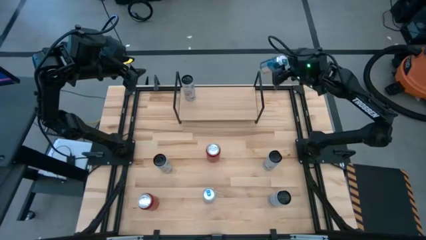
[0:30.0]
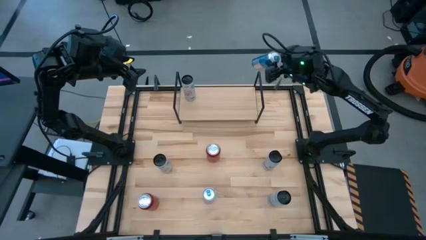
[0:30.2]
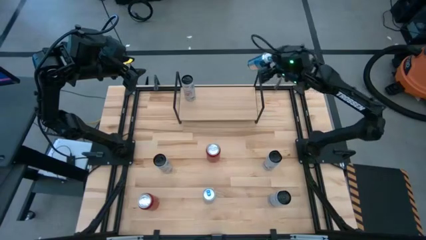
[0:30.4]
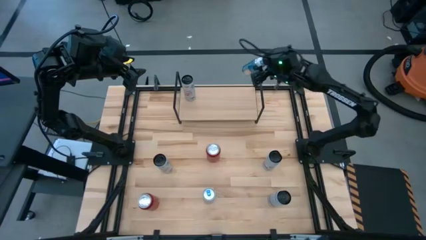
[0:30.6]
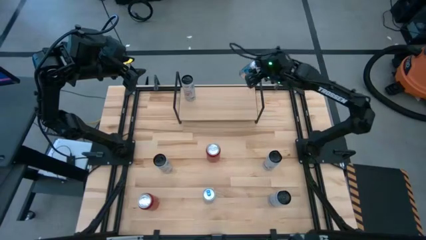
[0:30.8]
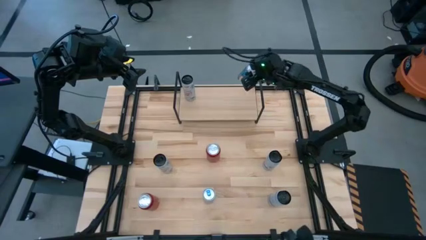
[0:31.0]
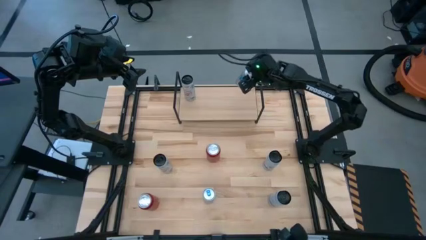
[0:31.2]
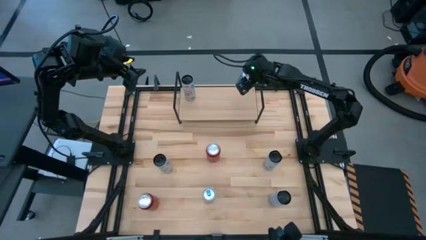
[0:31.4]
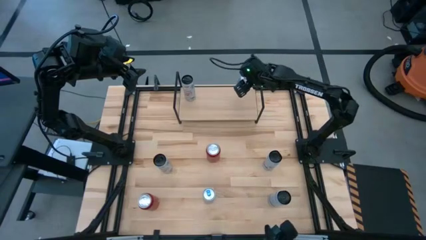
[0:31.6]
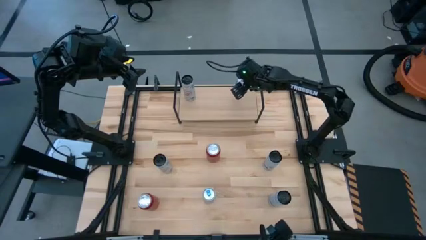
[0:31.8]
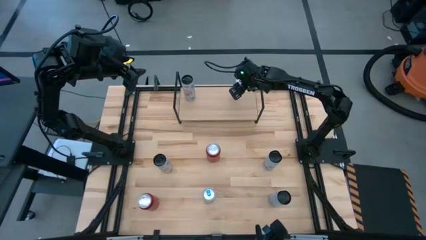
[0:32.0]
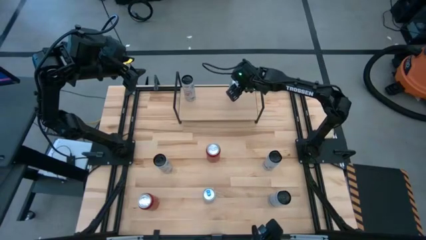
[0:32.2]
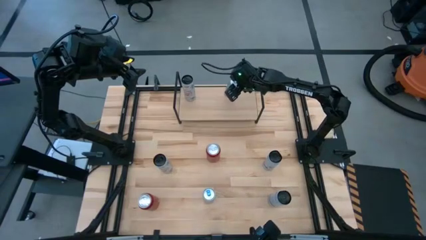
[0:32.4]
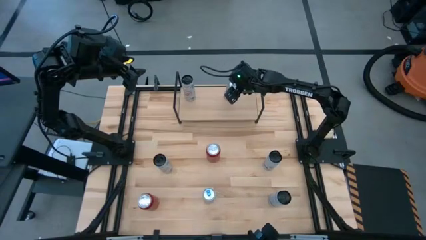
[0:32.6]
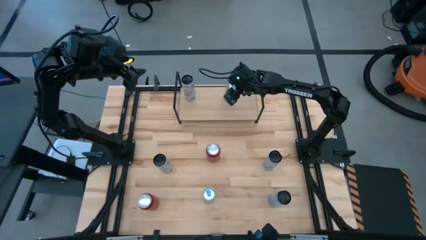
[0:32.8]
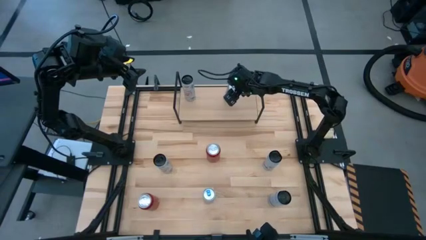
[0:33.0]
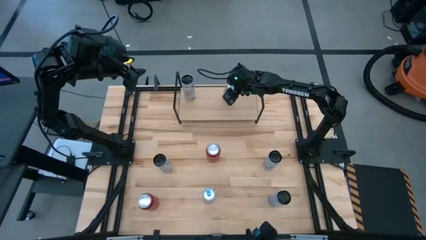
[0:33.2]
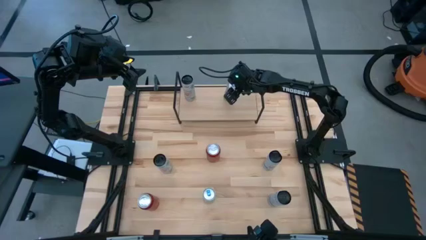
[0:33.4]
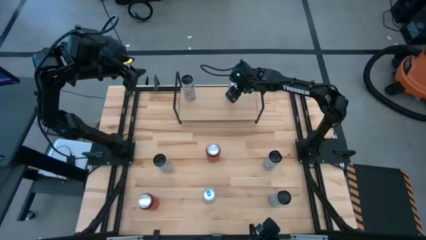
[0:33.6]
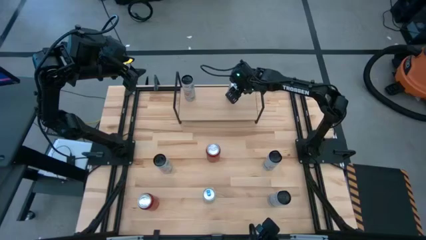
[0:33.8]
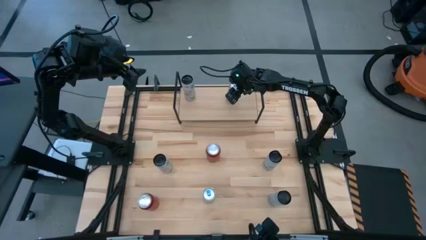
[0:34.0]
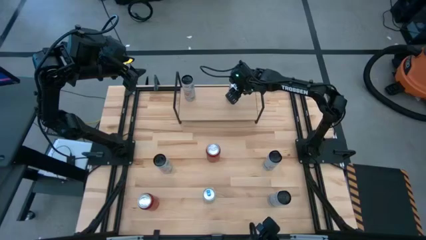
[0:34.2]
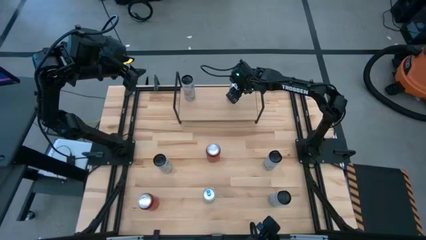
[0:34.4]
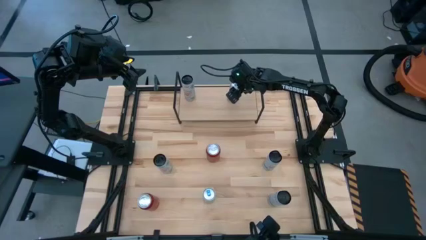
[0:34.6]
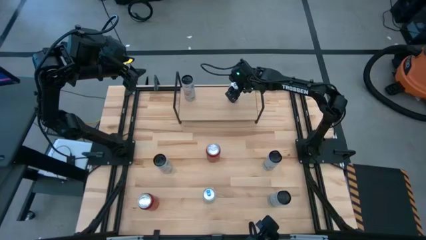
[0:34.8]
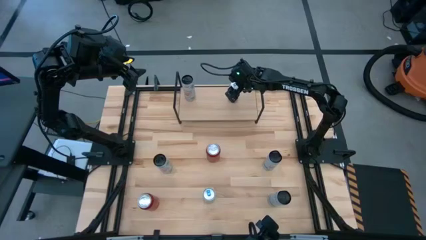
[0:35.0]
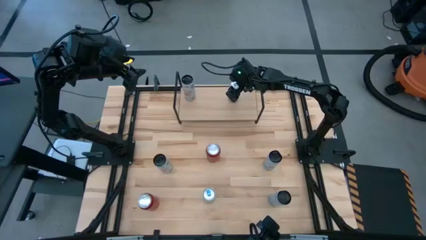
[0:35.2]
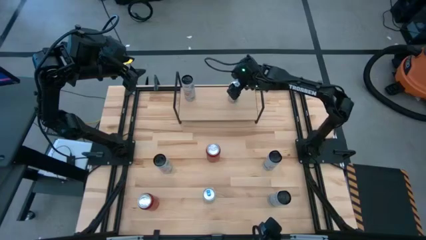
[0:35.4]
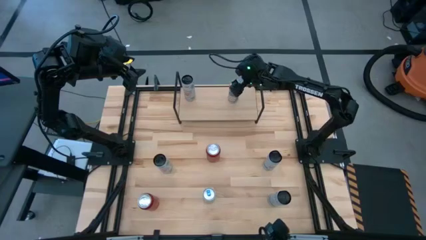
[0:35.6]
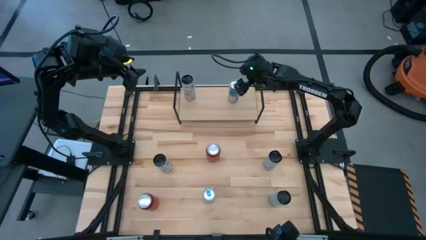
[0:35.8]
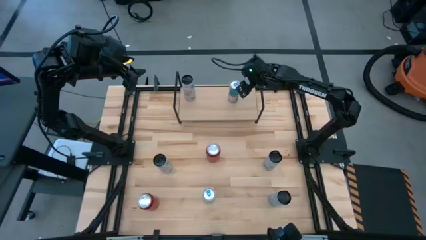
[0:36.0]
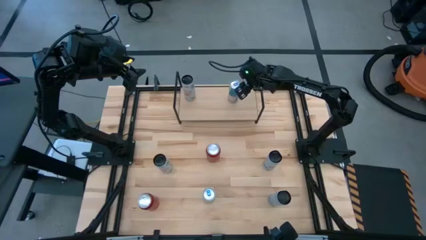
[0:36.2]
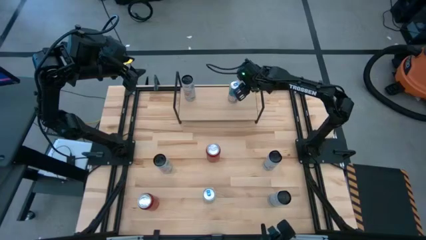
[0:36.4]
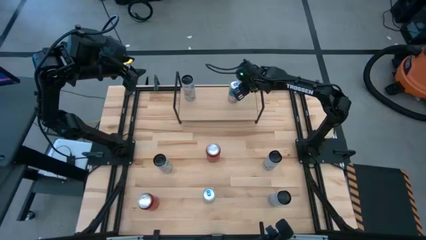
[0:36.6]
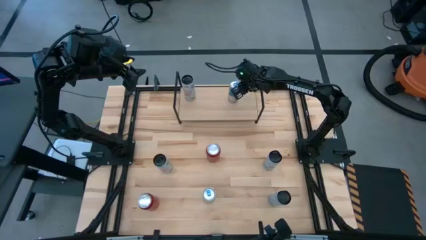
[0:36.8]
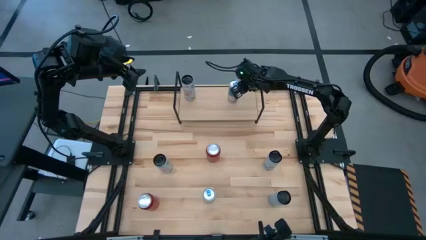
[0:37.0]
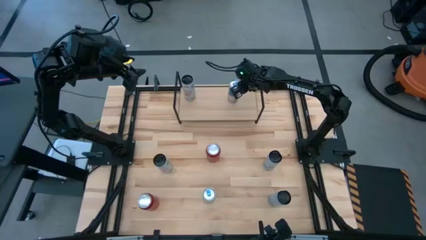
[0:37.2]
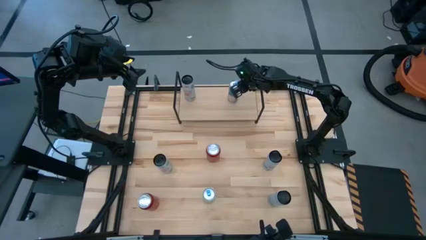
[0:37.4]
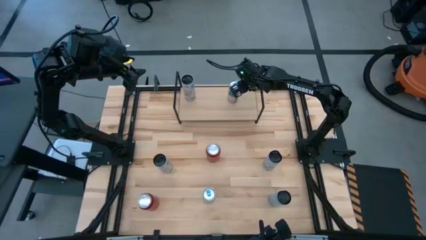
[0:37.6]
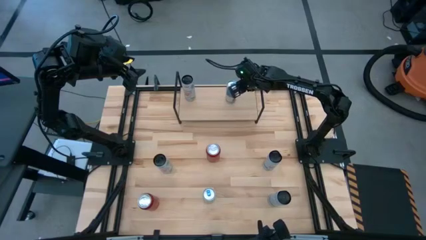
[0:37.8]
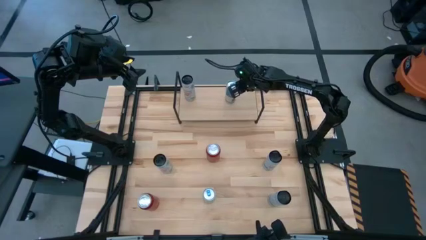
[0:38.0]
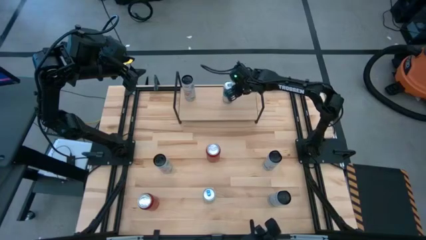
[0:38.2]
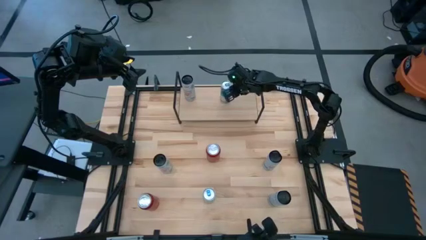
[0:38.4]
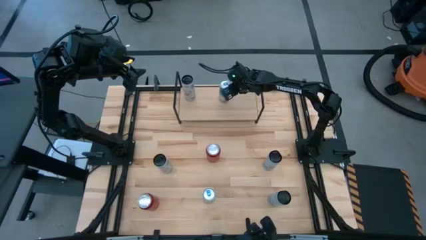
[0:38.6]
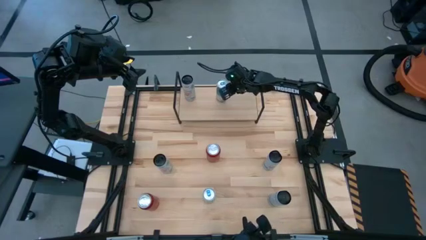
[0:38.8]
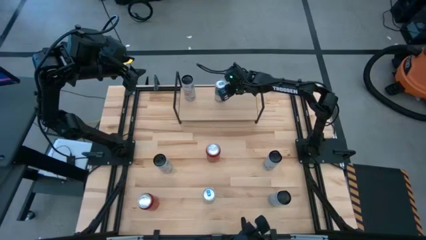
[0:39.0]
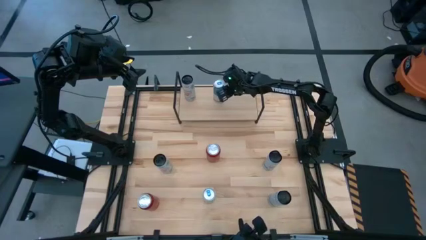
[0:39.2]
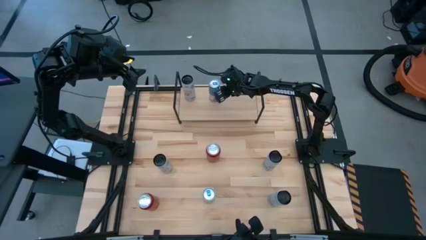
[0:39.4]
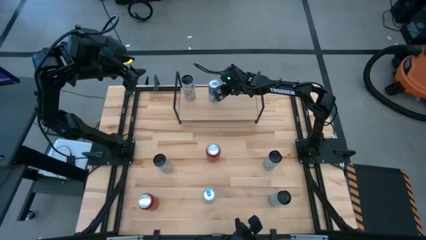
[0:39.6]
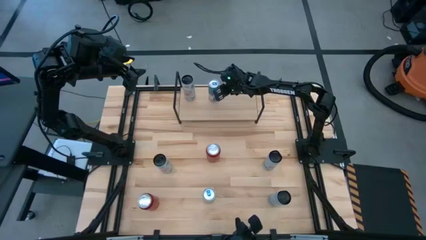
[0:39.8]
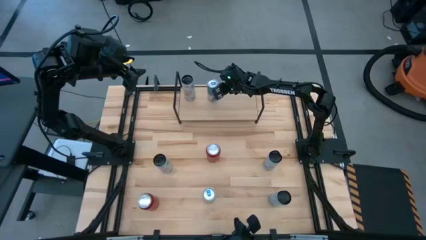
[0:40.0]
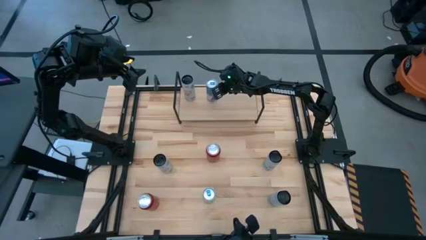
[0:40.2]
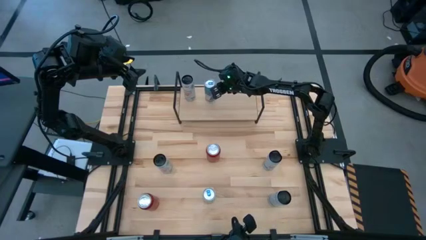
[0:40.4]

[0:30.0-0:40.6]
Task: Place canned beverage on shelf
Put the right blue soda can on the shelf
